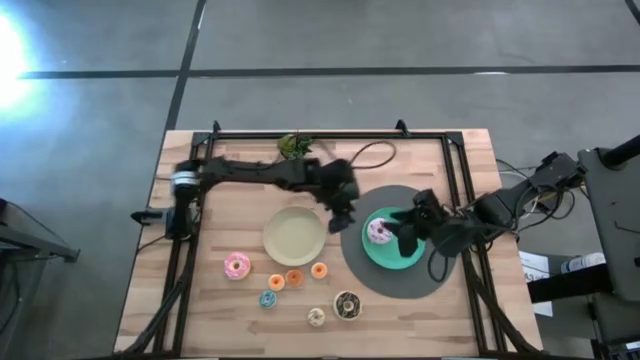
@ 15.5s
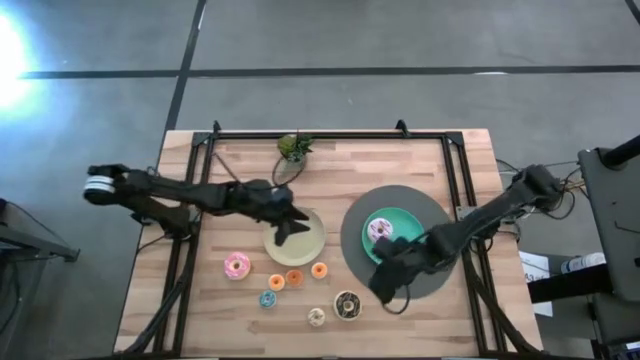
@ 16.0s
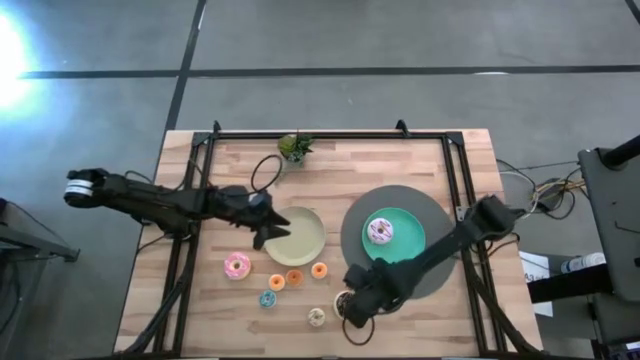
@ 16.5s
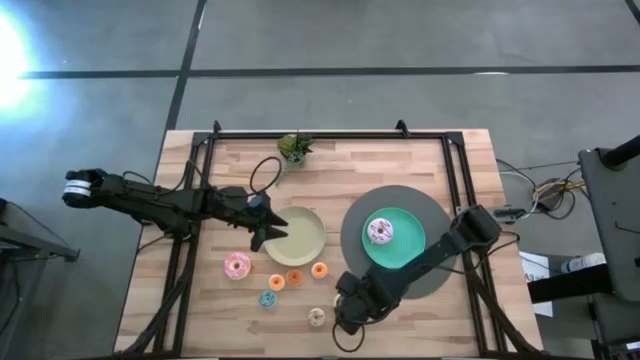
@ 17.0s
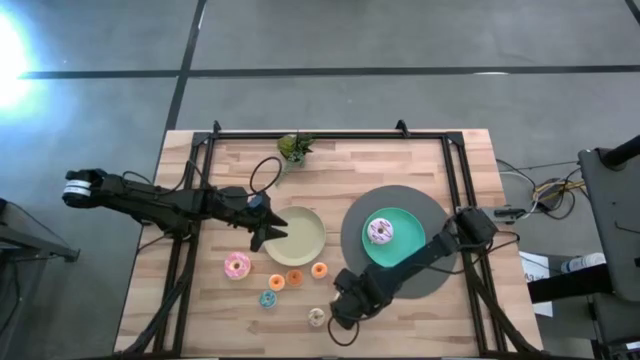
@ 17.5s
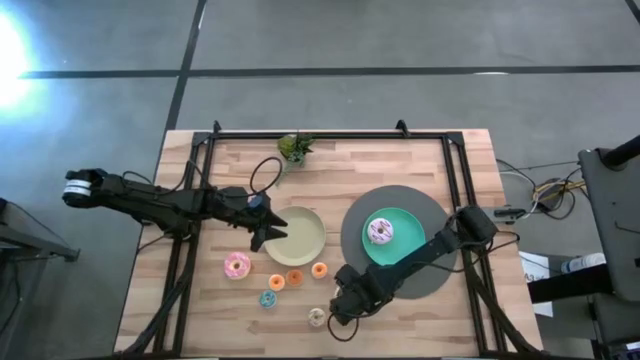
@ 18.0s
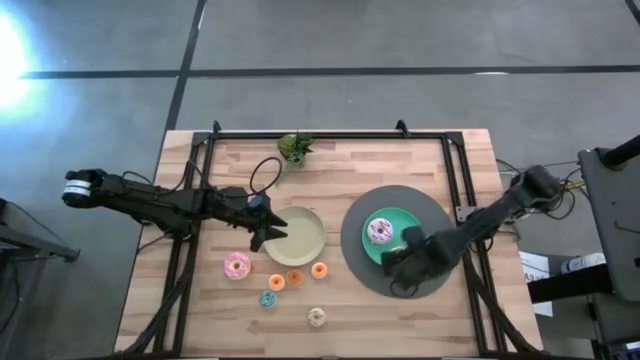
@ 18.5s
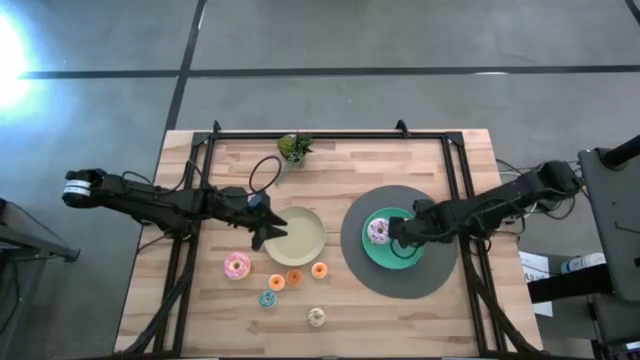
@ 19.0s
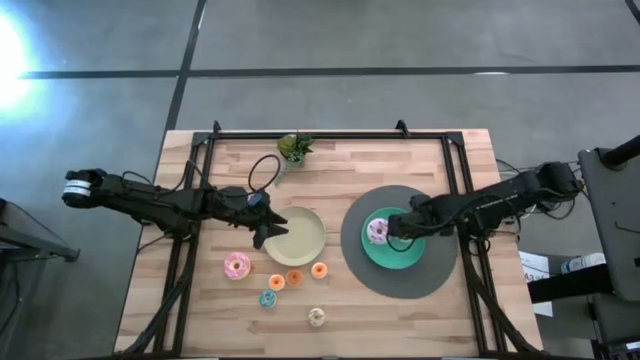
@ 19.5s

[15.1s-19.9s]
Task: Pick & Place donuts
Put the big black donut on the green plate

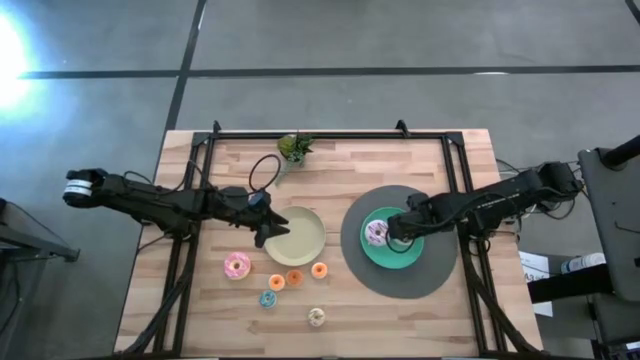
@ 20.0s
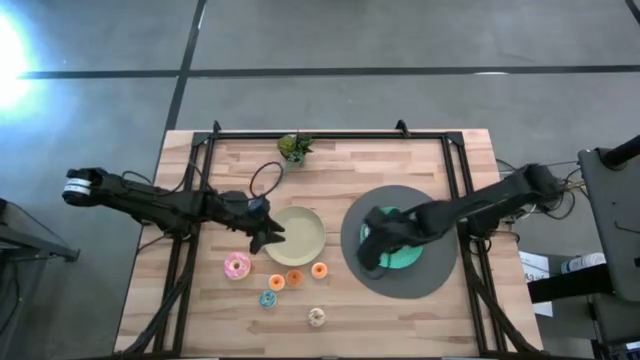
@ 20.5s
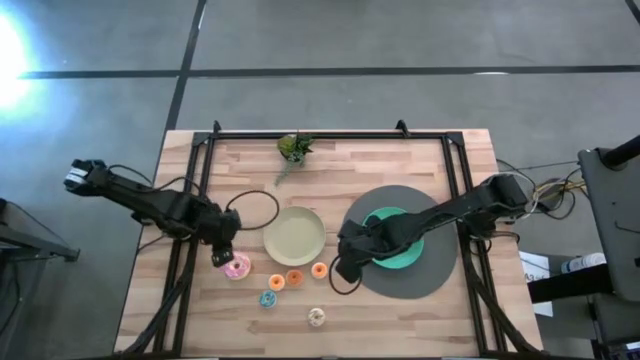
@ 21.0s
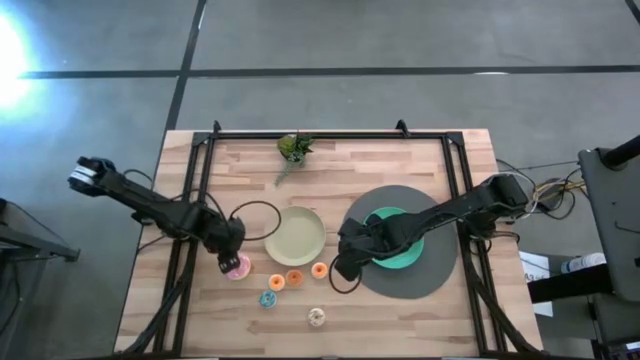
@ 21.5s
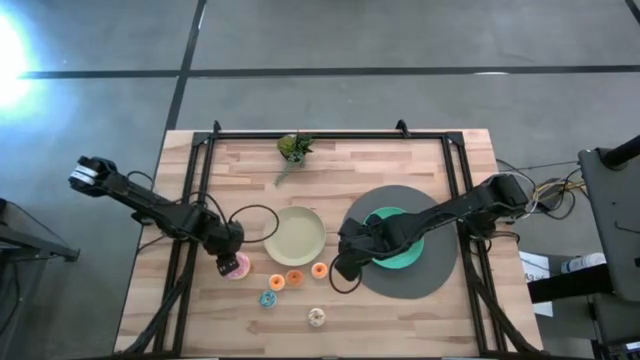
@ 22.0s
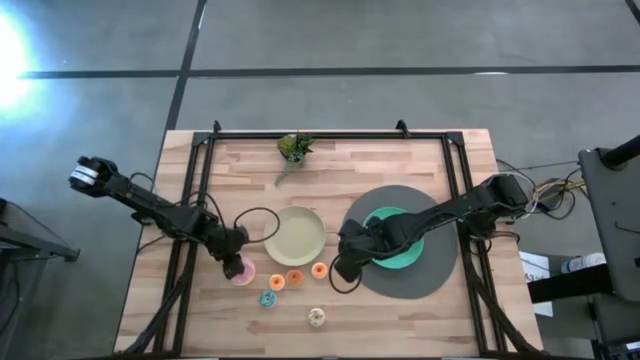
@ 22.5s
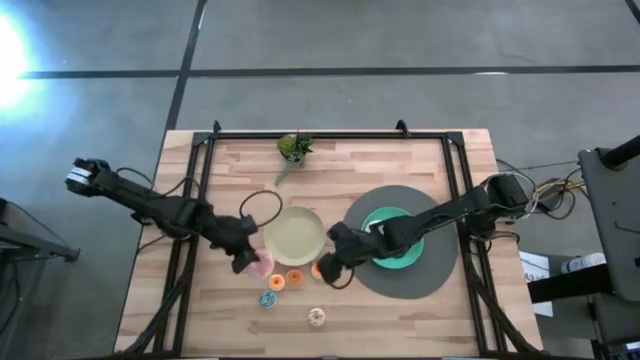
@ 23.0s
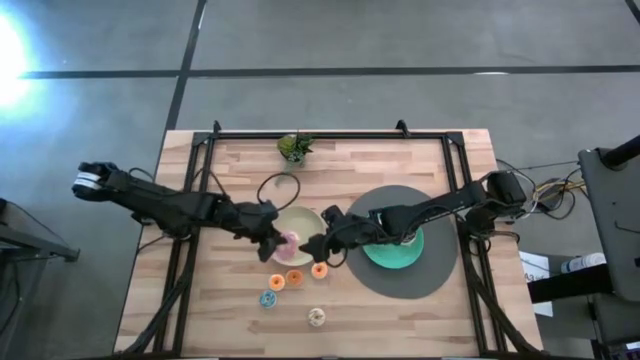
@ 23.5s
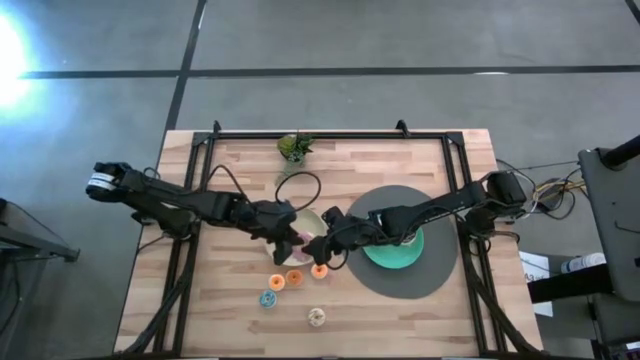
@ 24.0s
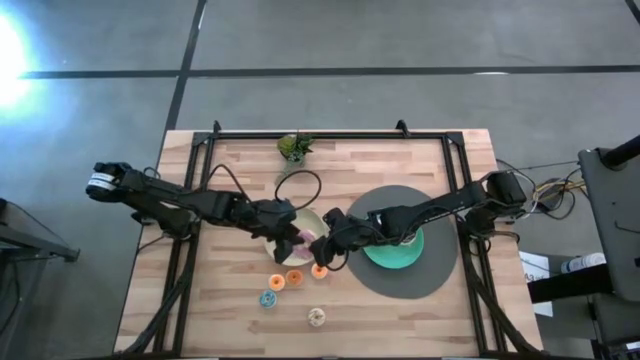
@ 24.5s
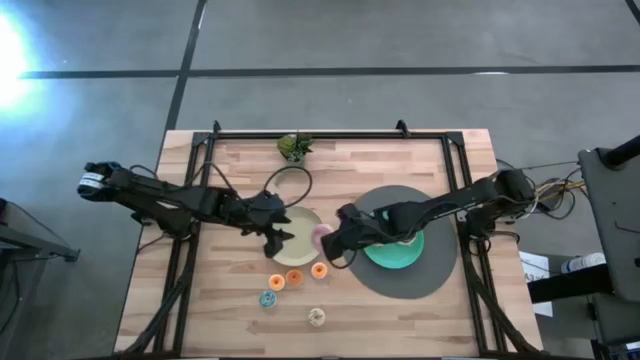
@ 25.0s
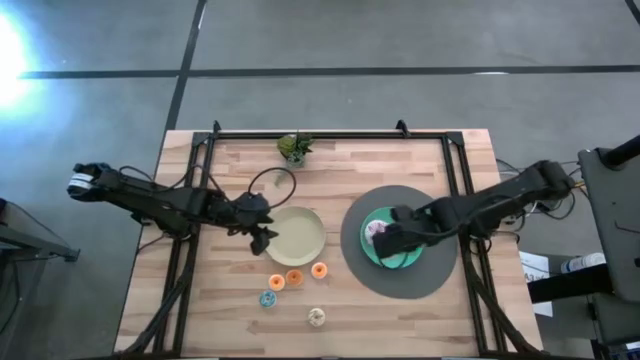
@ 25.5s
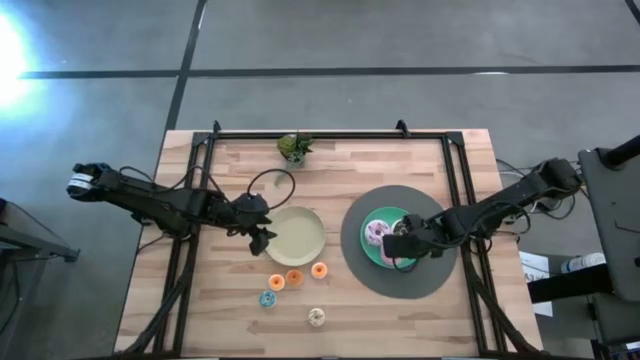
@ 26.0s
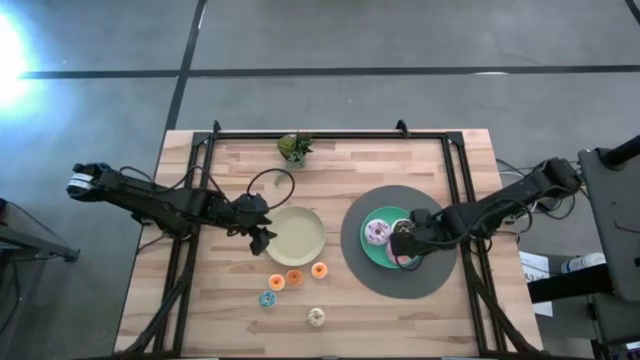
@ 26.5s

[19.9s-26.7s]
Put the big pink donut on the green plate

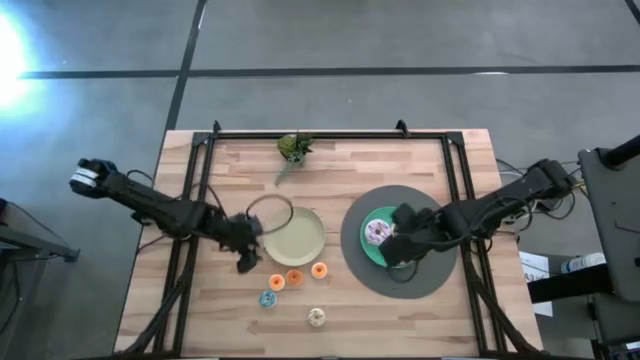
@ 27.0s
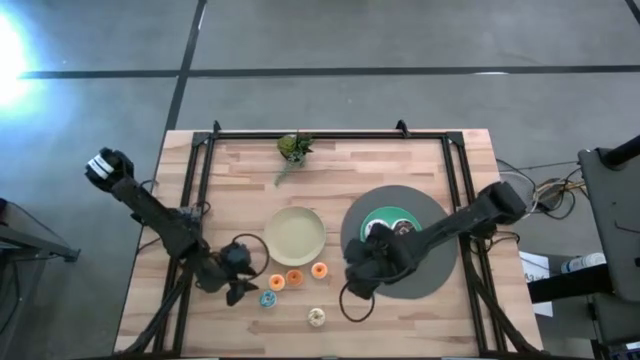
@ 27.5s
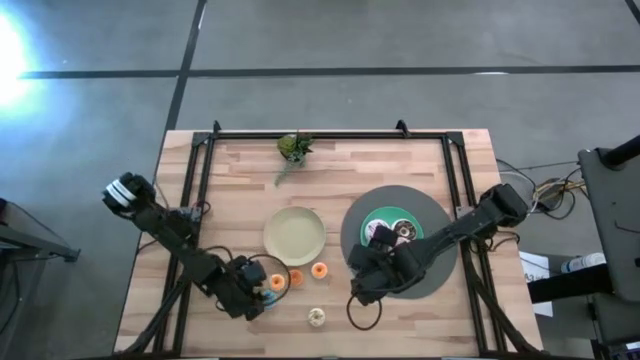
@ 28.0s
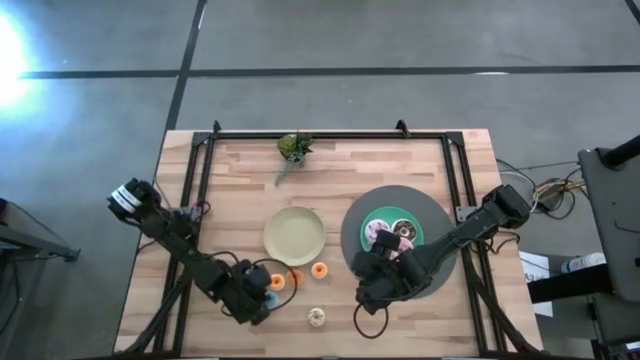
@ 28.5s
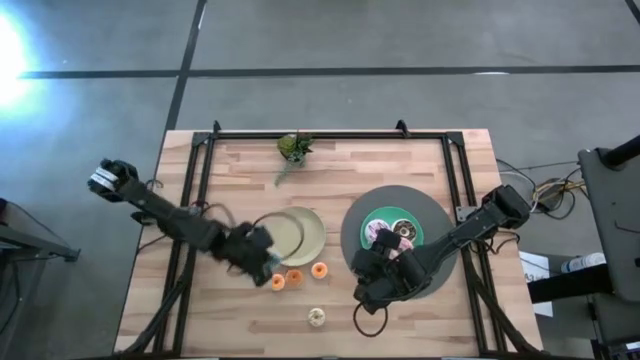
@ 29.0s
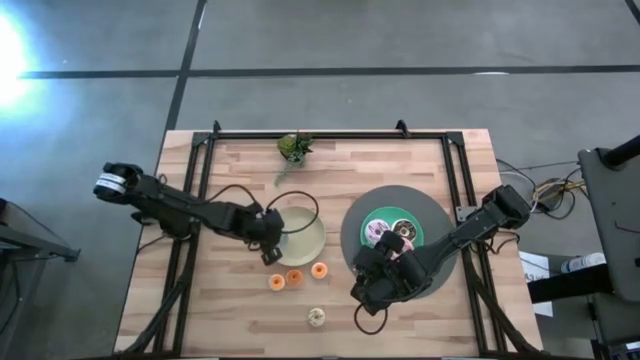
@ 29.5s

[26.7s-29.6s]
Put the small blue donut on the white plate

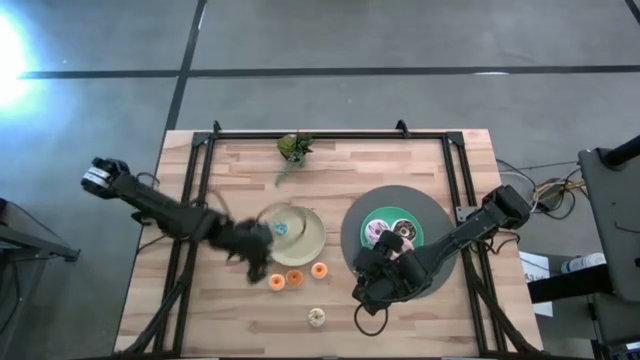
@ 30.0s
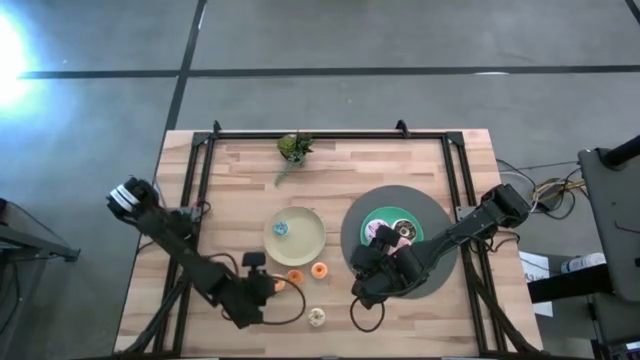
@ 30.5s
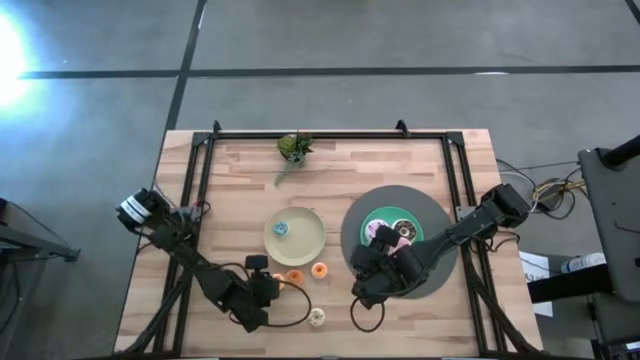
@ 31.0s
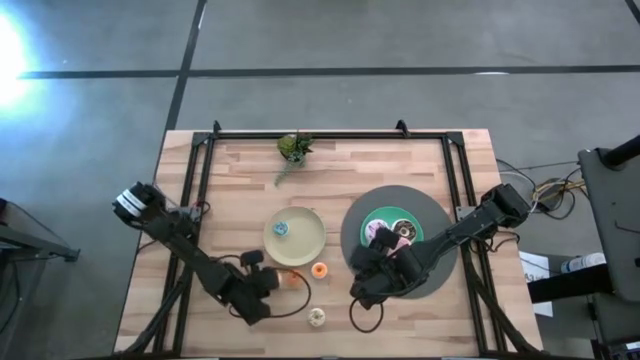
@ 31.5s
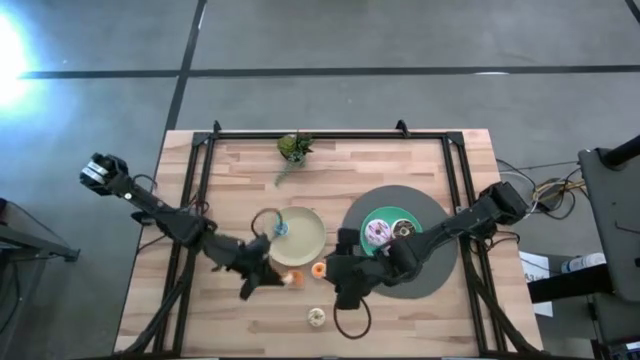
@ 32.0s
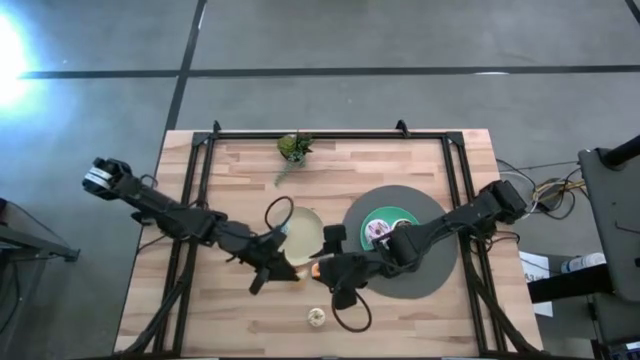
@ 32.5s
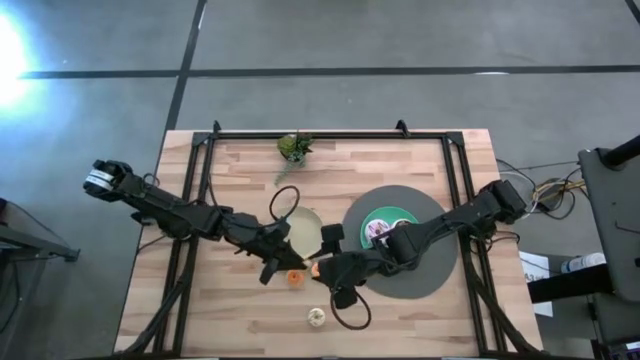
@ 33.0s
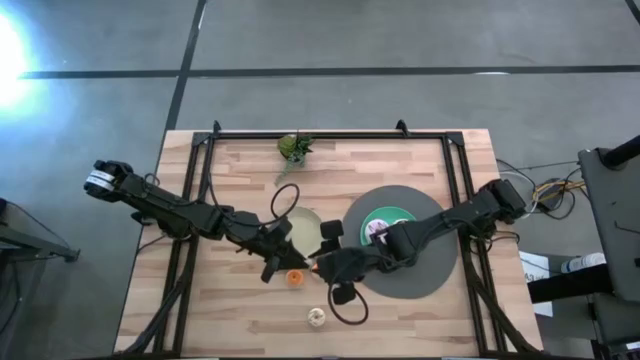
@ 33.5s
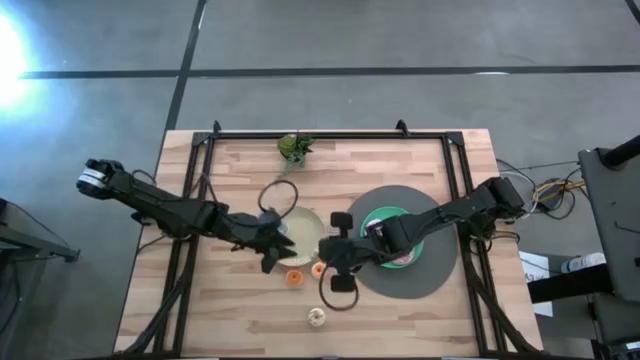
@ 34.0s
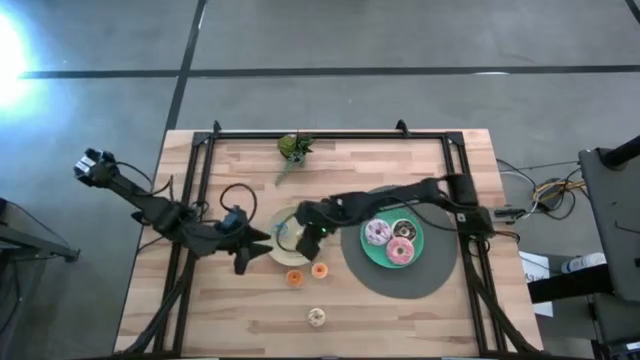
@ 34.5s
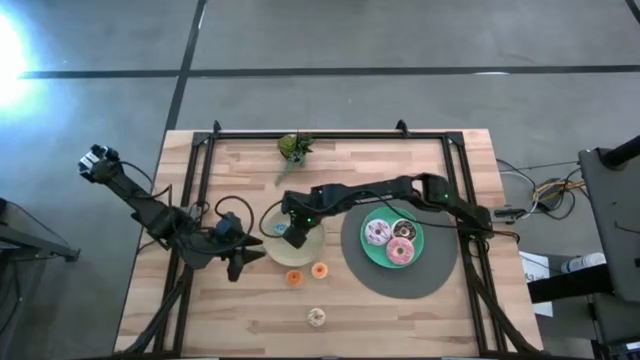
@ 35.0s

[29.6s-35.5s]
Put the small yellow donut on the white plate
